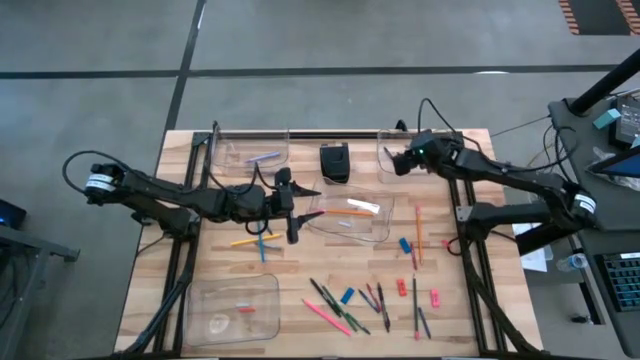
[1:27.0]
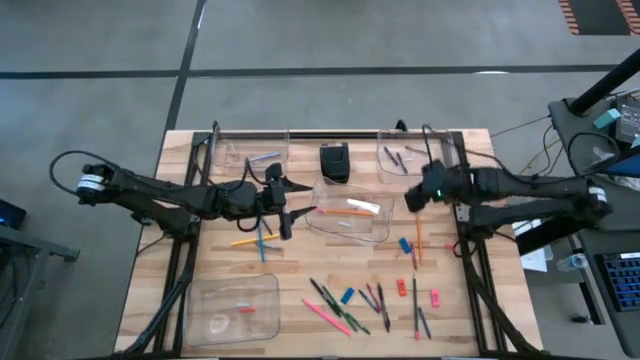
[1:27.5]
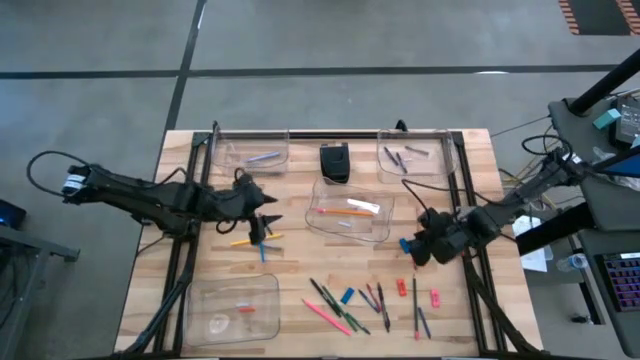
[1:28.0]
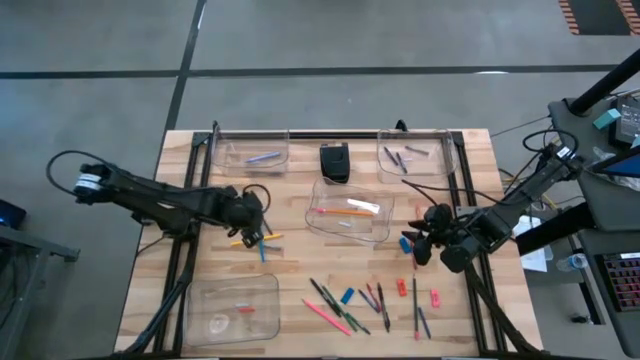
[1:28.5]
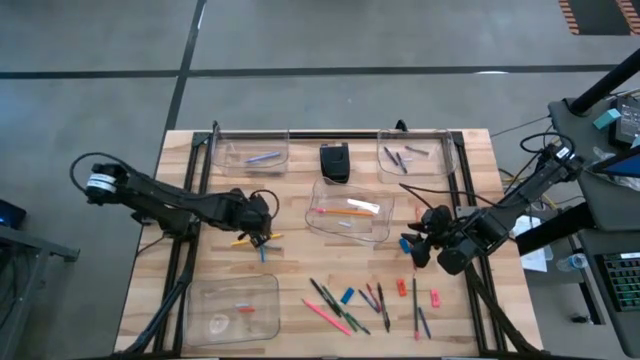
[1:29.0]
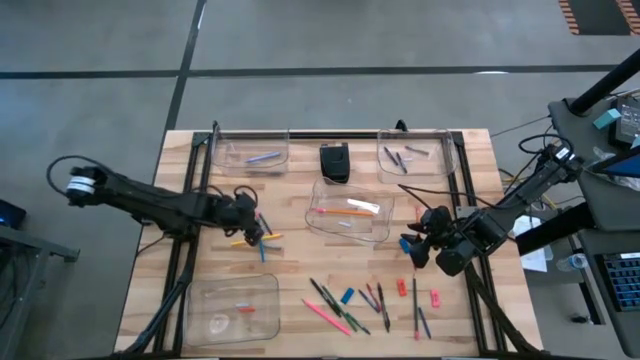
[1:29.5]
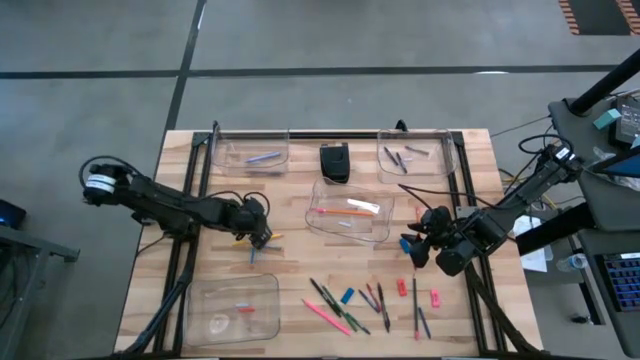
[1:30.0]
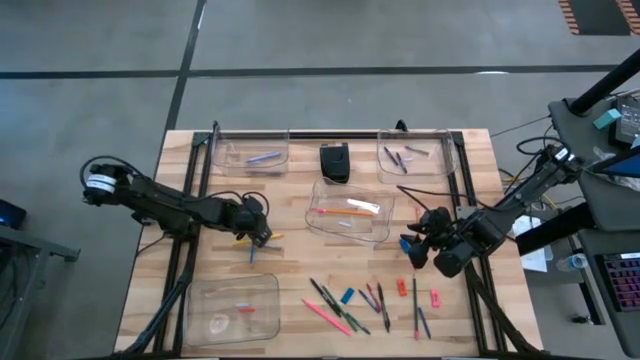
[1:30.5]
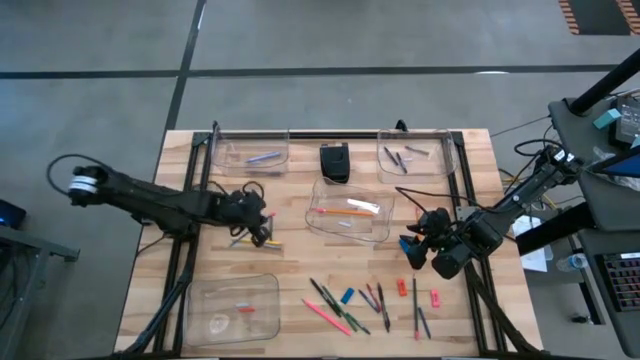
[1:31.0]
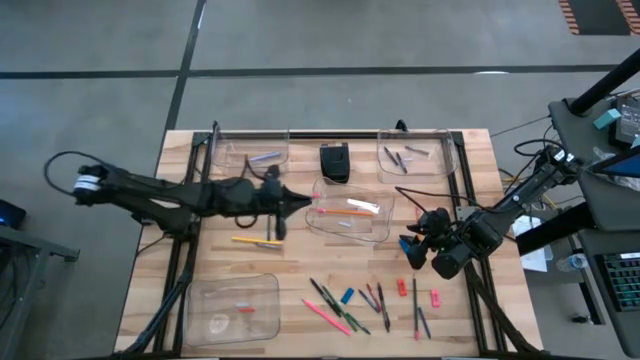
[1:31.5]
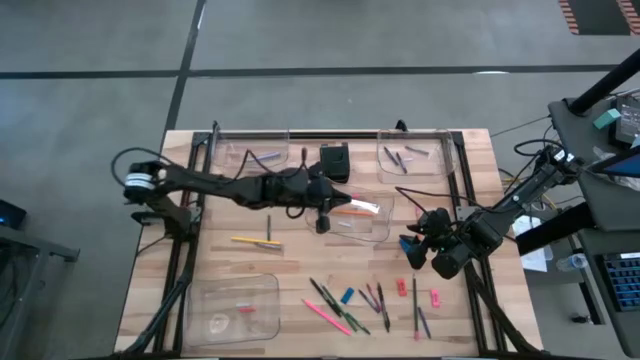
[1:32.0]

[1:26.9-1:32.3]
Task: Sort crayons/erasers/pens/pencils in bins
Put the blue pencil into the middle transparent bin

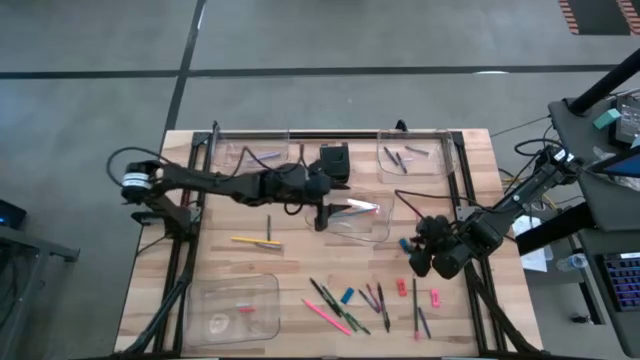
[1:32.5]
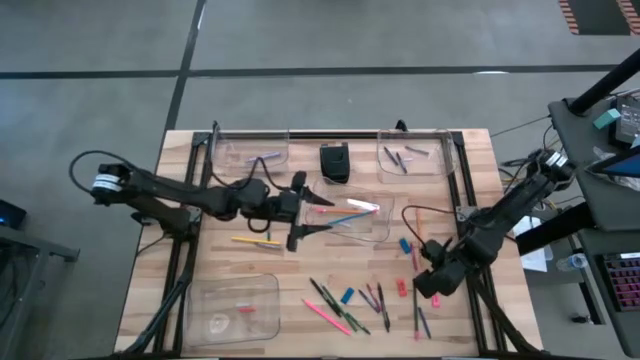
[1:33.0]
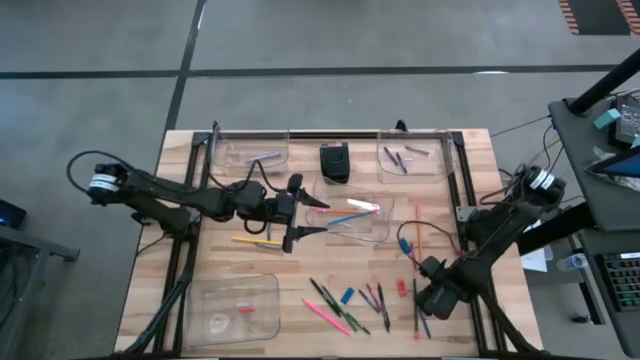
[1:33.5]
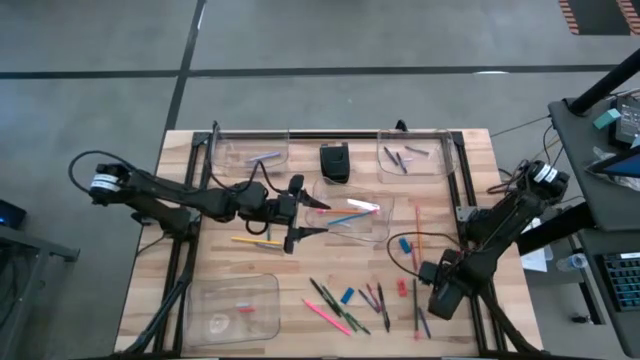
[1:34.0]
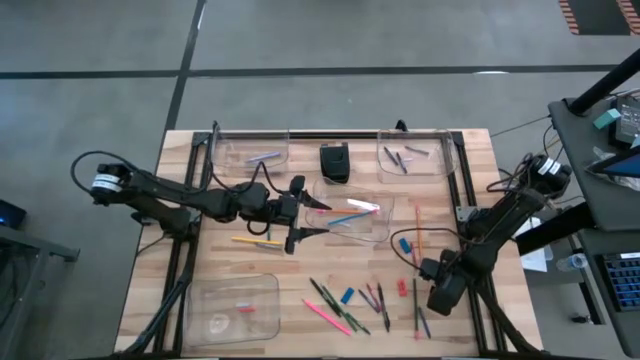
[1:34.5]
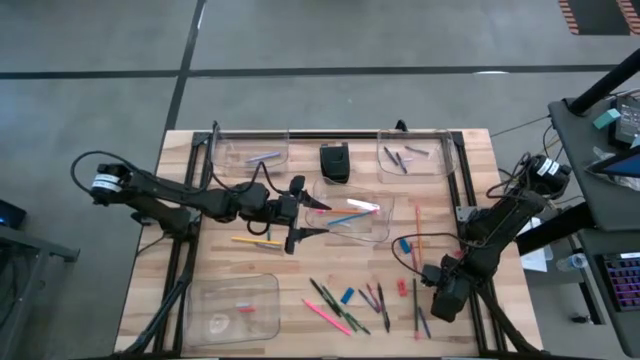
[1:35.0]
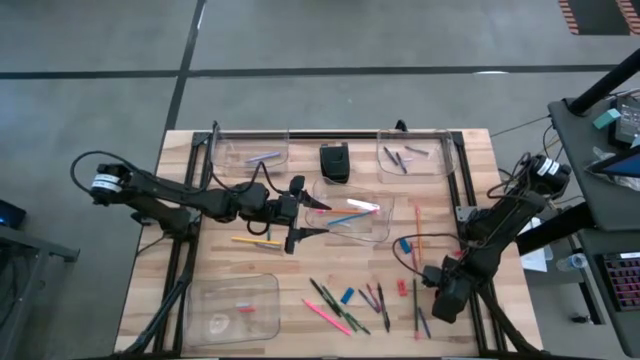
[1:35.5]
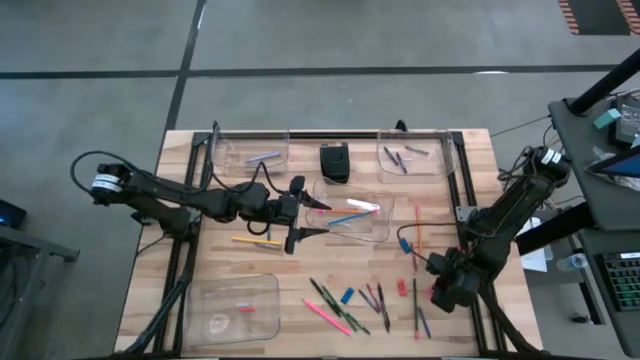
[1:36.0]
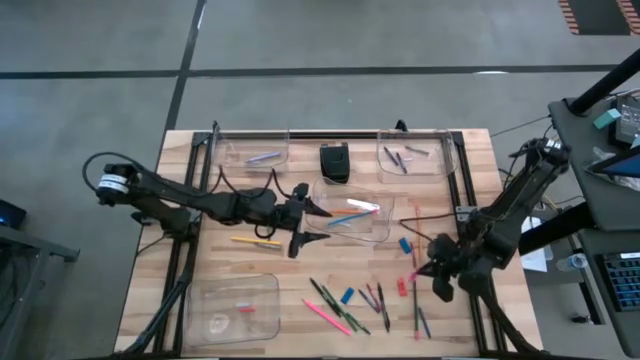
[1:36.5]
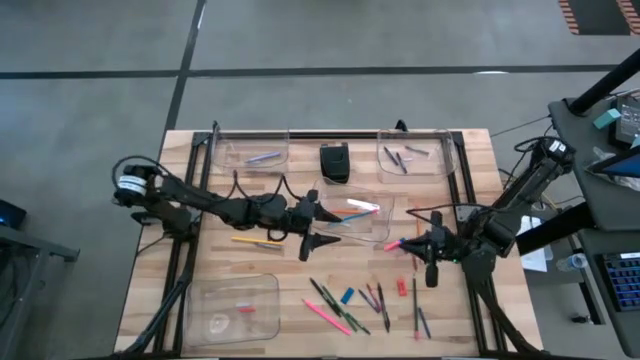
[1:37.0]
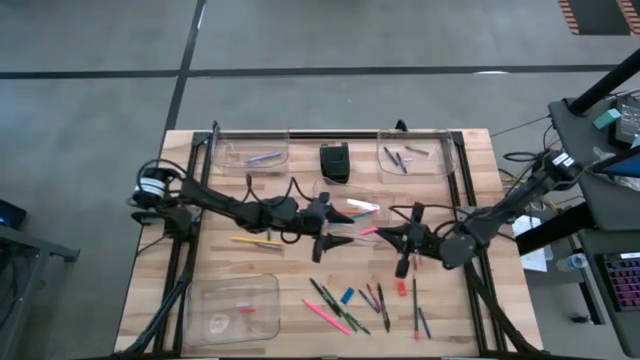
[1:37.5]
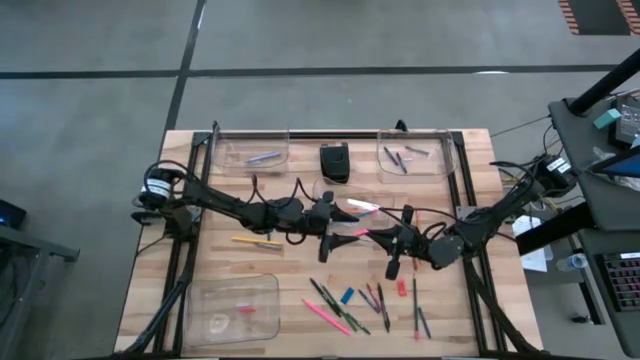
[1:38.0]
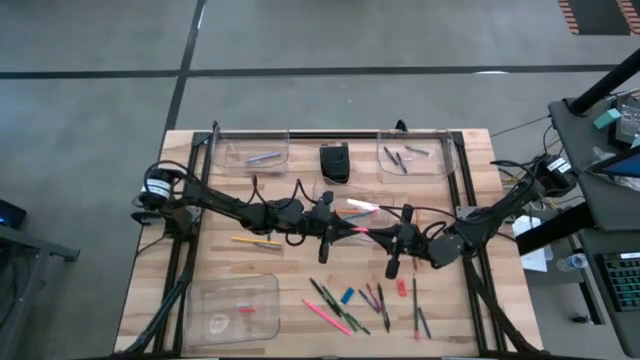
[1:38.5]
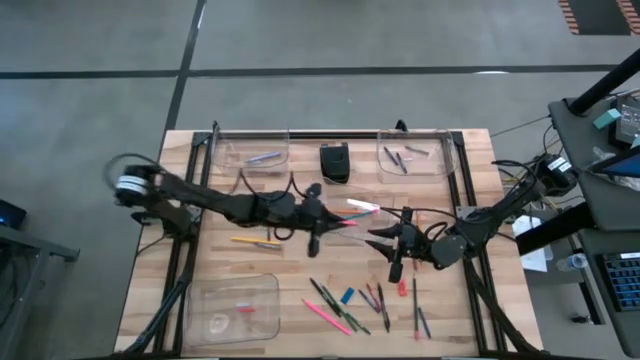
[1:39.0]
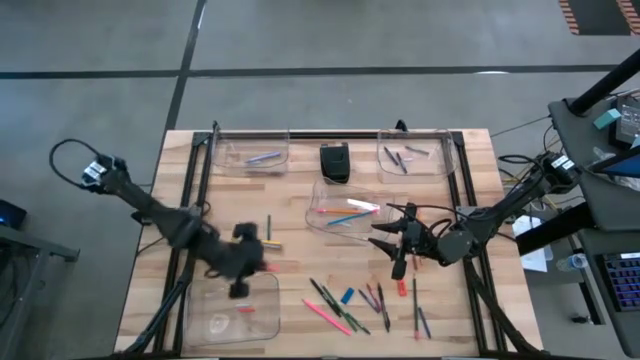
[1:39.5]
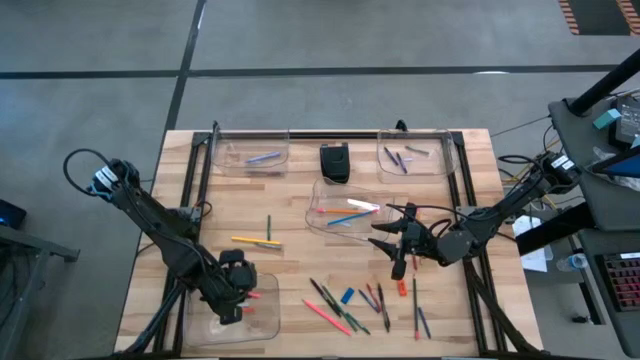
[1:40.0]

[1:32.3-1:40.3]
Put the pink eraser into the bottom left transparent bin

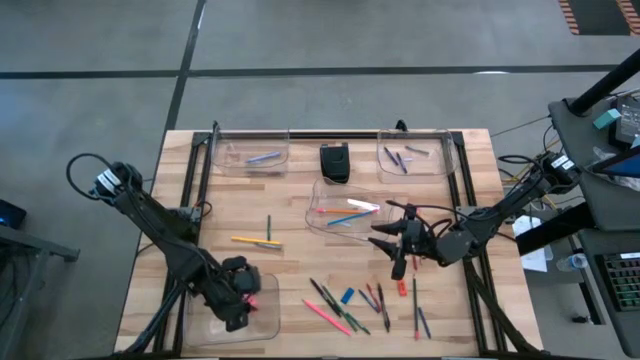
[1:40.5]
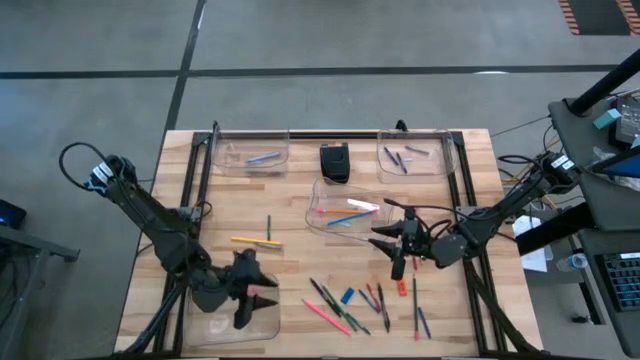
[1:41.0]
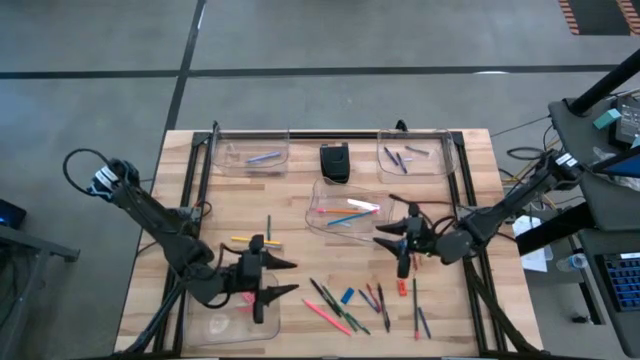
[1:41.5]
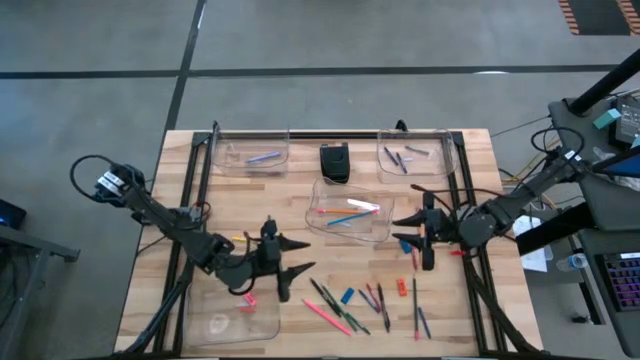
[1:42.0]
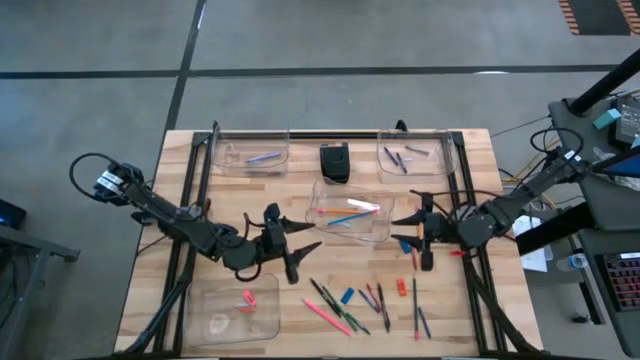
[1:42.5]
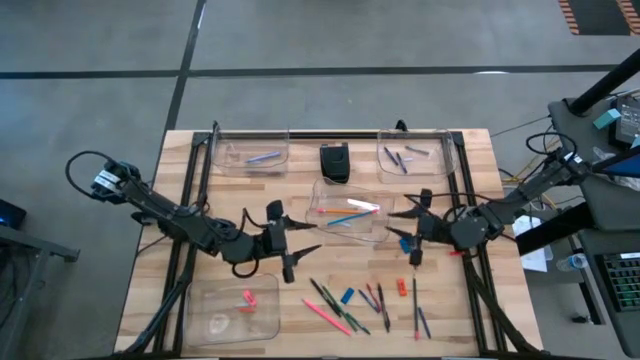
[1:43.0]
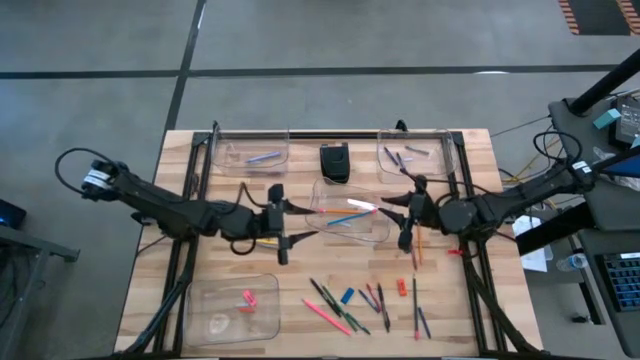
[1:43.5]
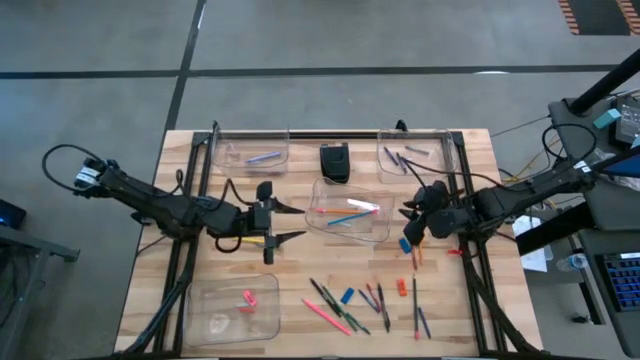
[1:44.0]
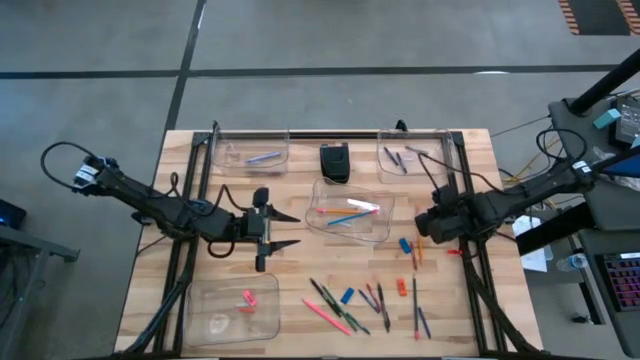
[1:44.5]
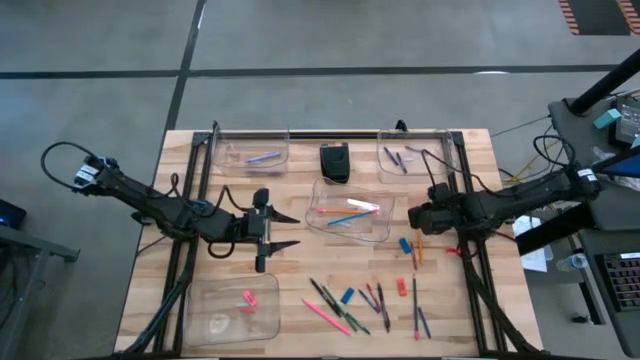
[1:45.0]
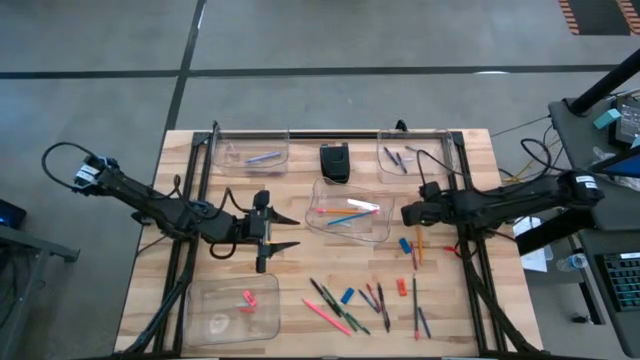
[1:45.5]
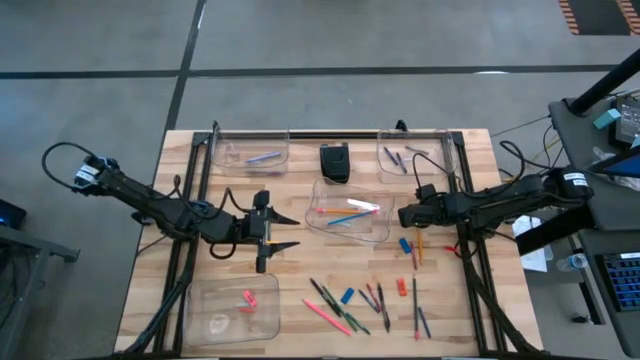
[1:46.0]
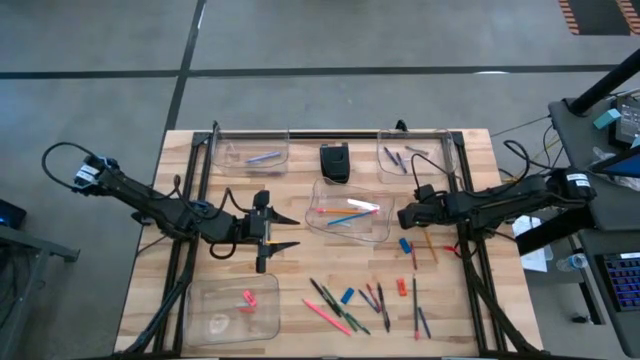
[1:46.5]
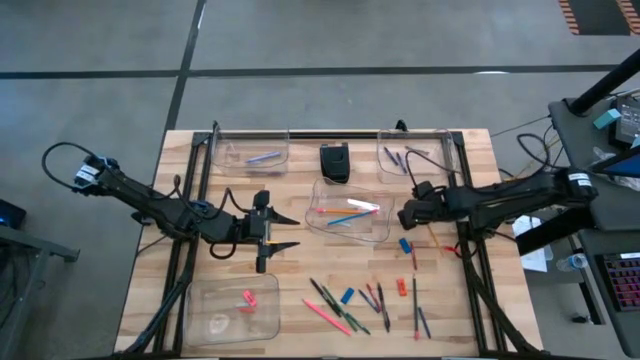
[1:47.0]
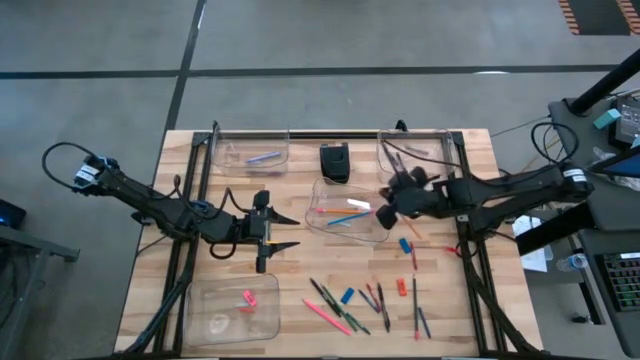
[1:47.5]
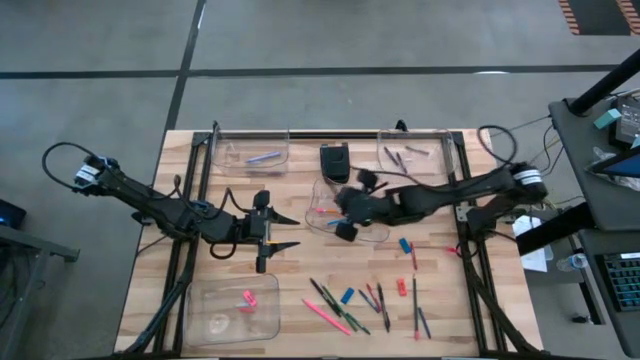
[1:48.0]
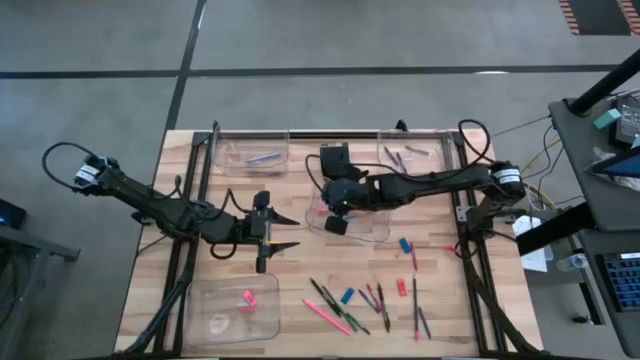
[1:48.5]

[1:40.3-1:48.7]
Put the orange pencil into the middle transparent bin
